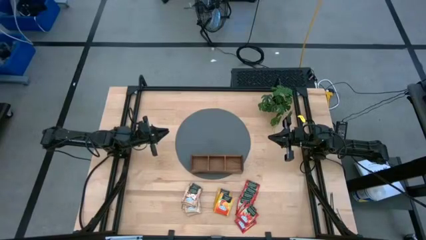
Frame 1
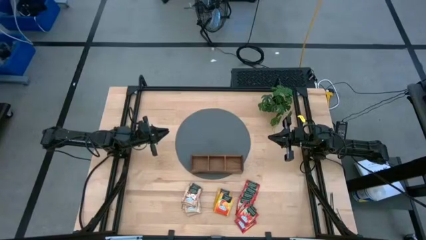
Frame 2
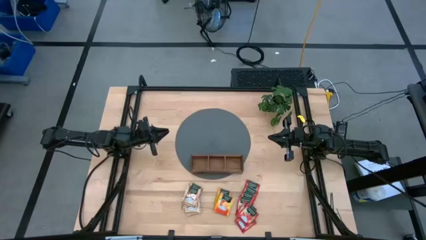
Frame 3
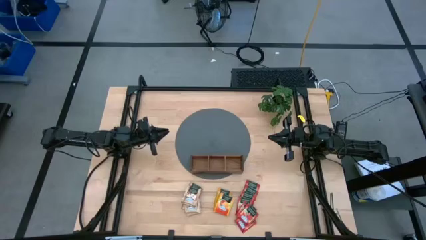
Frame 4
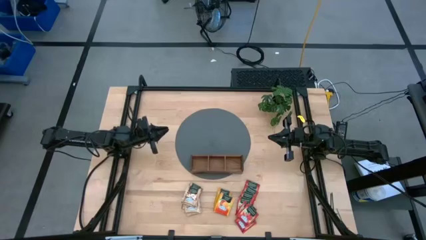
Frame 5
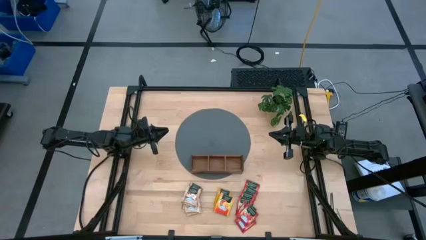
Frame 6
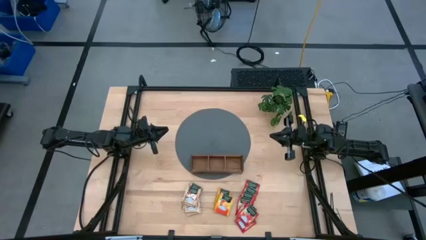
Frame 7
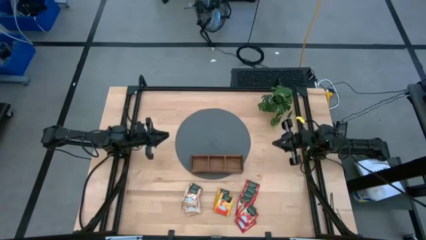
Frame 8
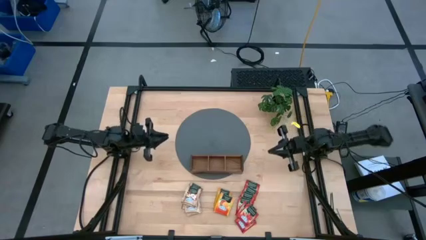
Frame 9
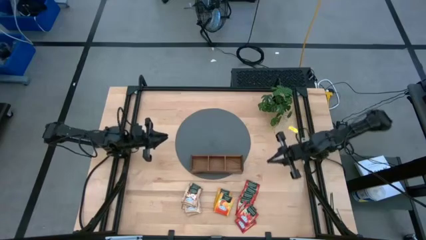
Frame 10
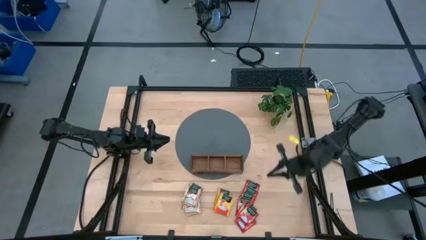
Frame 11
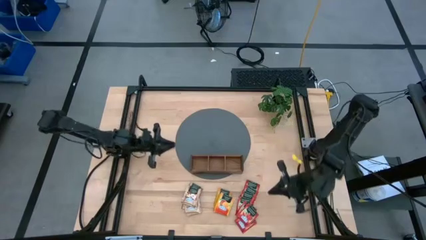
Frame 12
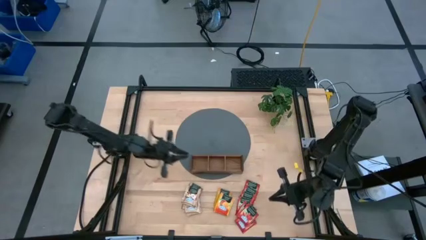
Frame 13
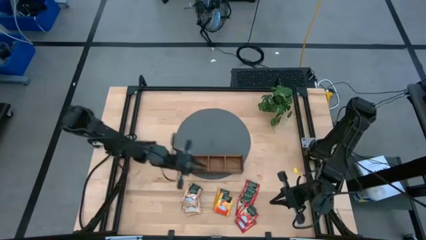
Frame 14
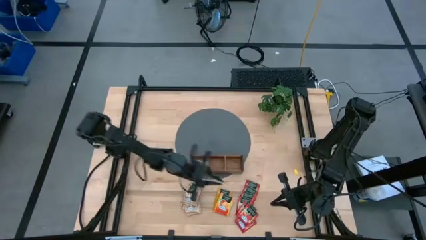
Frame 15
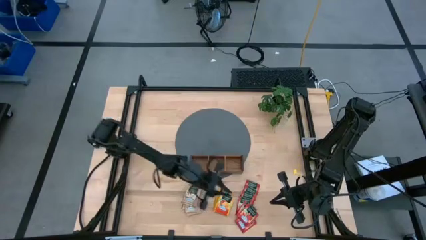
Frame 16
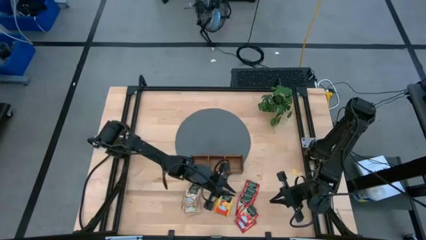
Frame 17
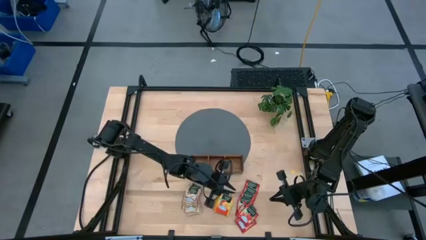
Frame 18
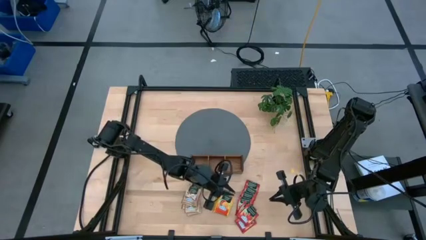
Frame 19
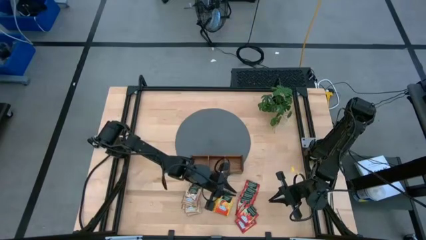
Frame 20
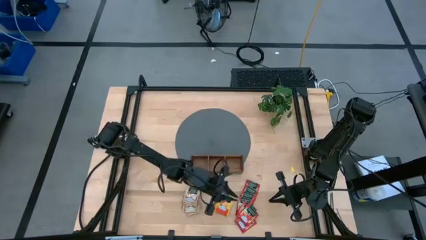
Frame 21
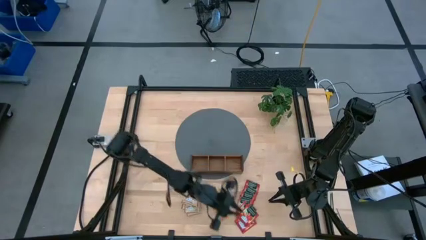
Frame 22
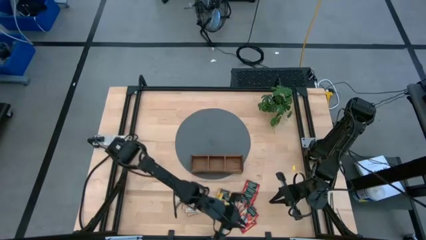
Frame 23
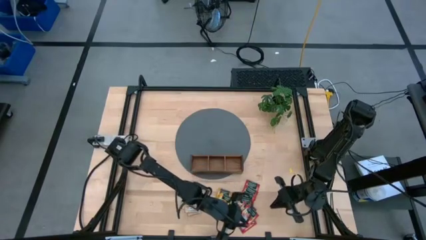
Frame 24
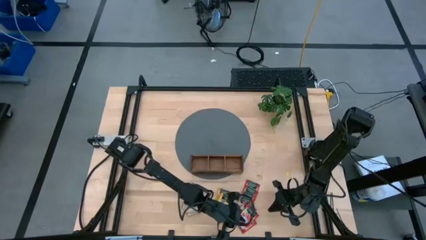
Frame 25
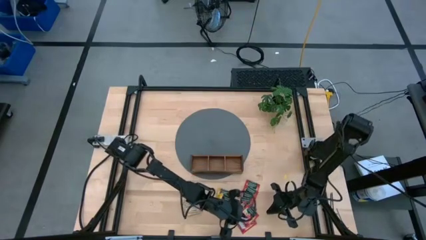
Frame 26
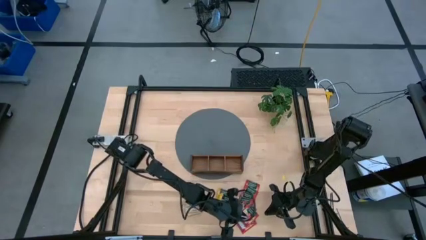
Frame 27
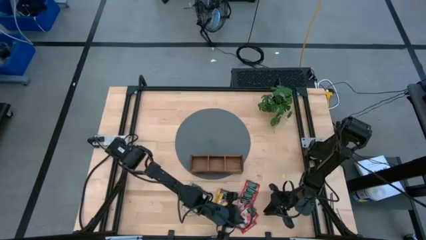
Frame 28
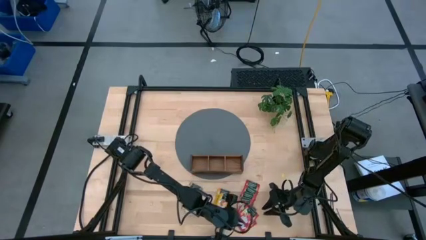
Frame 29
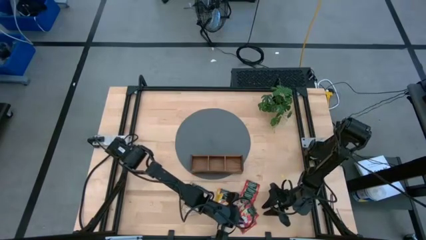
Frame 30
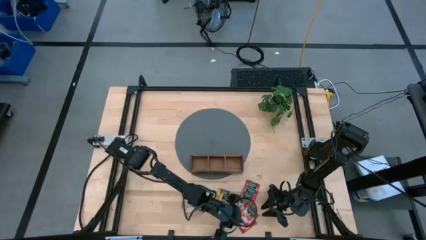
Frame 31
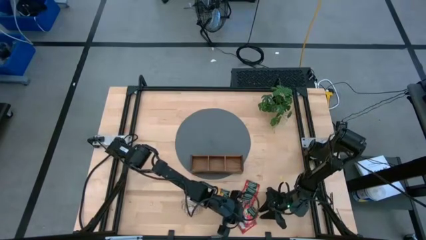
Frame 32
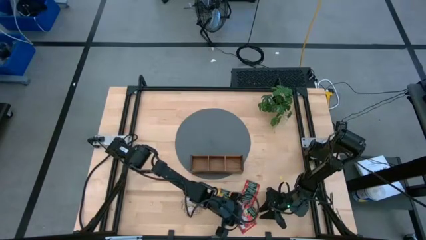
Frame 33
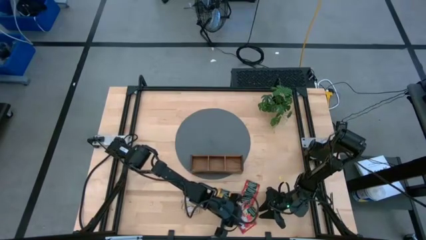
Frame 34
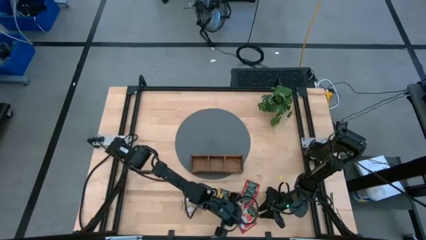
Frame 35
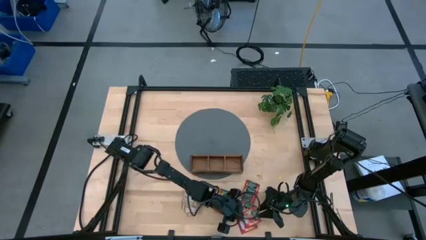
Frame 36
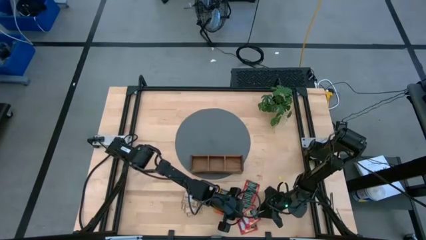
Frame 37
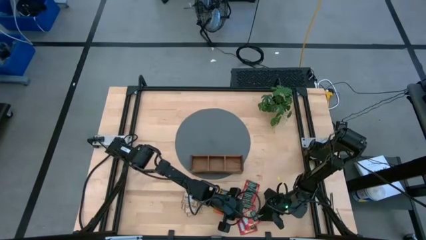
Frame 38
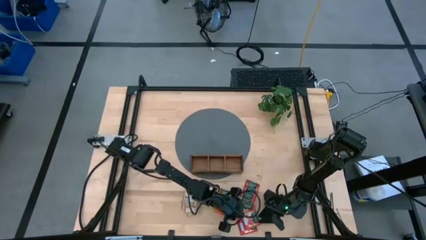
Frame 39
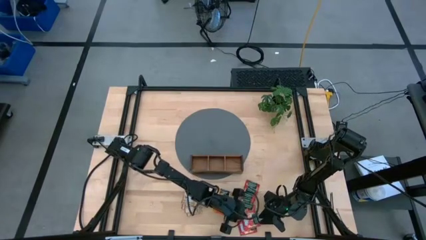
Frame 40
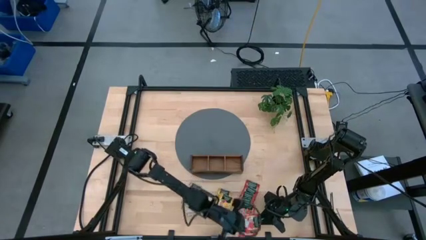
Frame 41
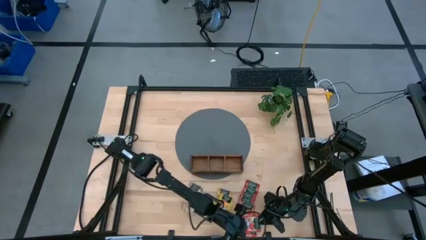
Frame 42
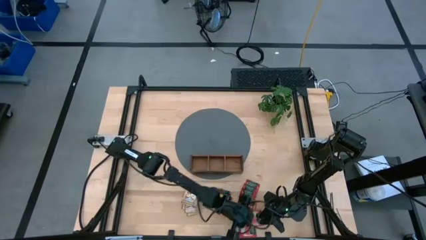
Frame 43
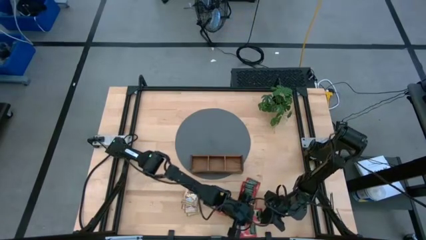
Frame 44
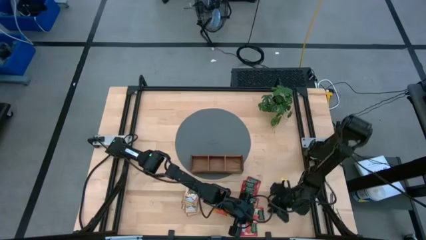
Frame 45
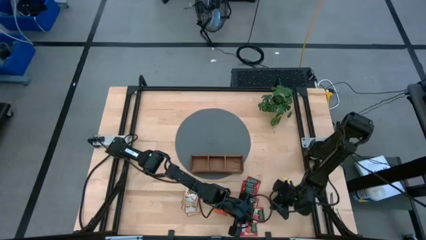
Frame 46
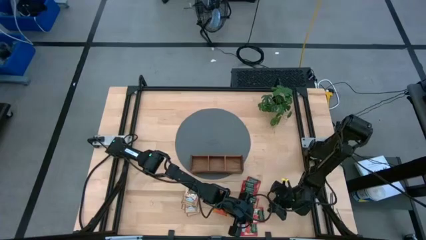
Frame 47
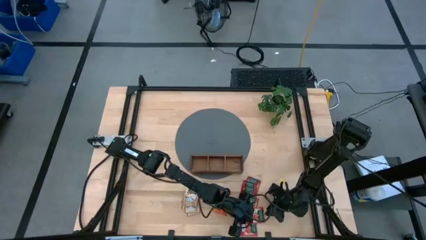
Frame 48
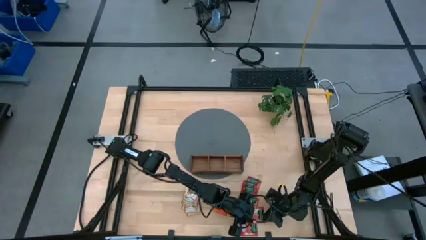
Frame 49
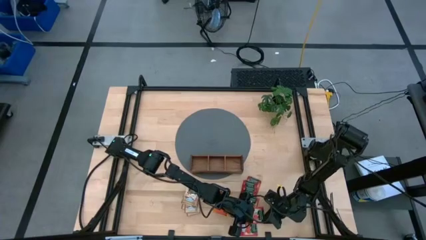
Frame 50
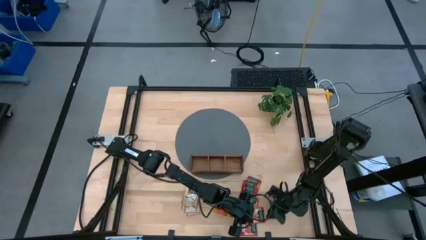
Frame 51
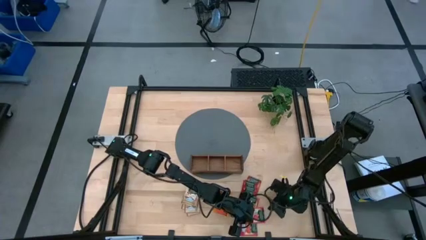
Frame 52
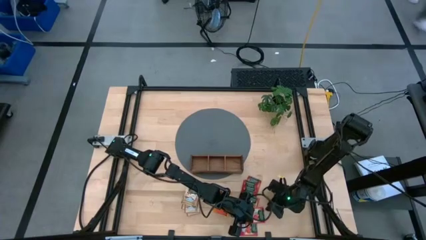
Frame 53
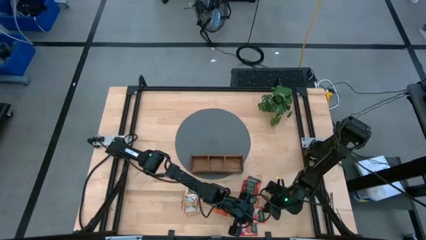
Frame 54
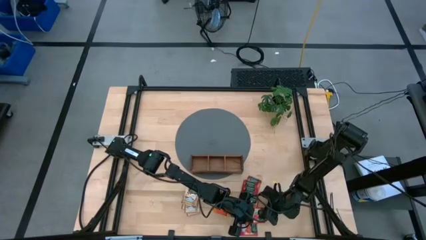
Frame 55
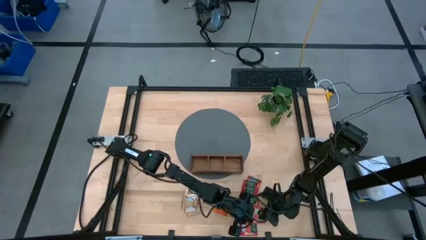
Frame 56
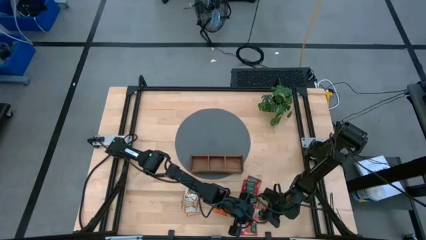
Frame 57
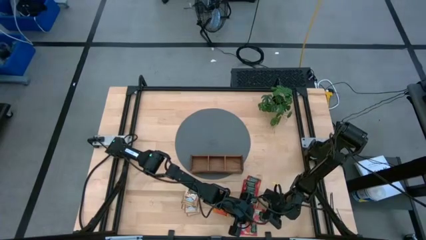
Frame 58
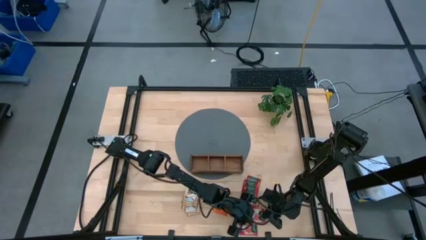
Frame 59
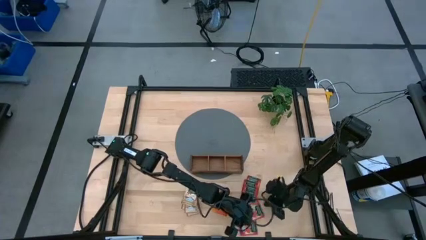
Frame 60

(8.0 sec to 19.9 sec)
Task: Pick & Place Tea
Put the red tea bag into the right section of the wooden organizer

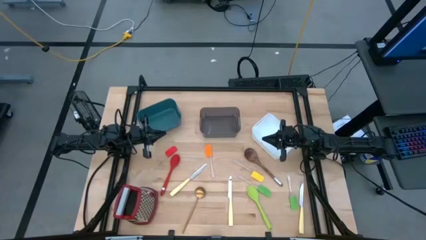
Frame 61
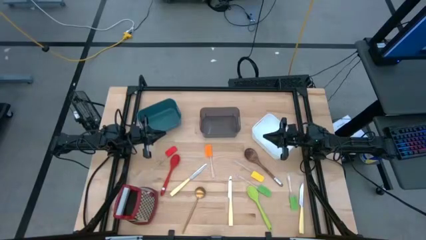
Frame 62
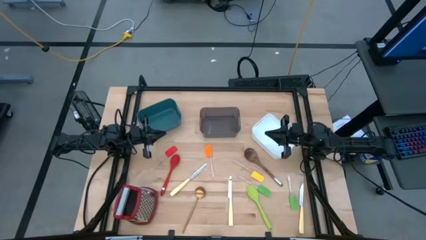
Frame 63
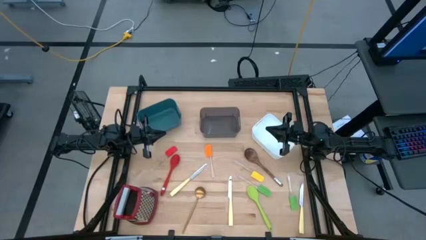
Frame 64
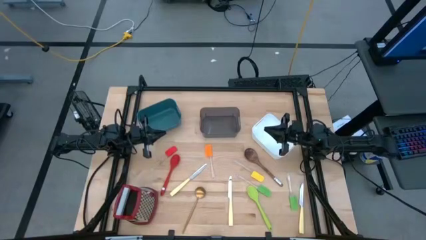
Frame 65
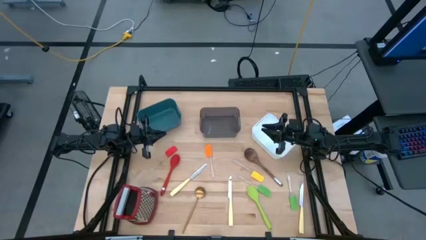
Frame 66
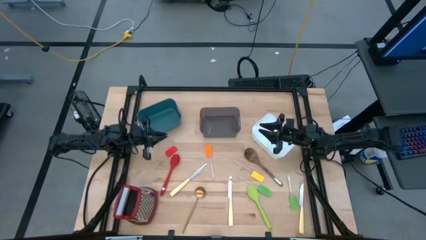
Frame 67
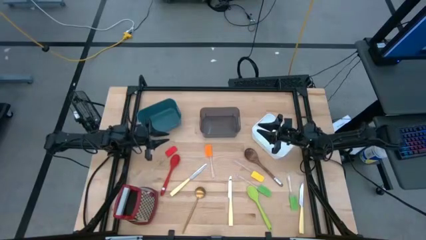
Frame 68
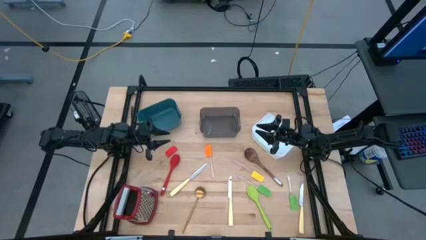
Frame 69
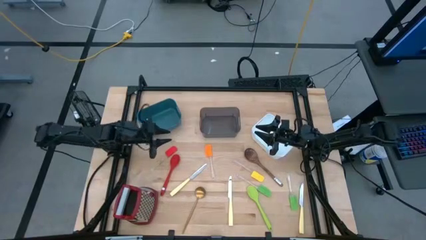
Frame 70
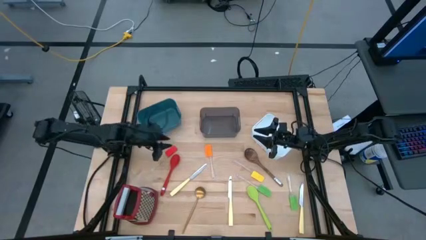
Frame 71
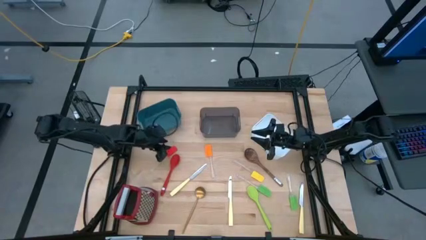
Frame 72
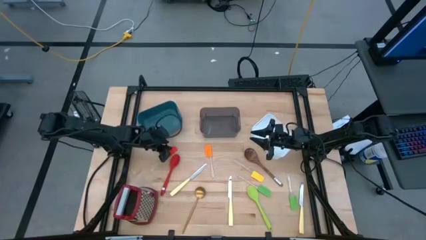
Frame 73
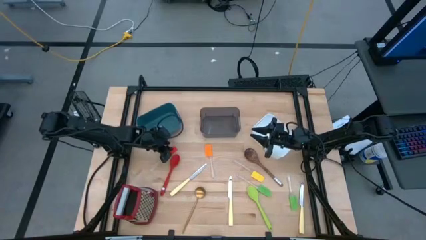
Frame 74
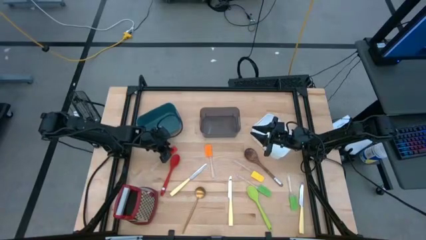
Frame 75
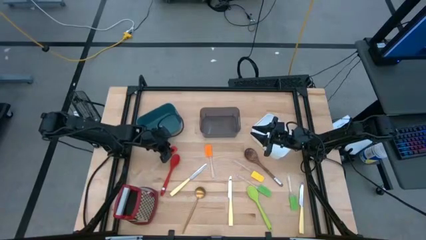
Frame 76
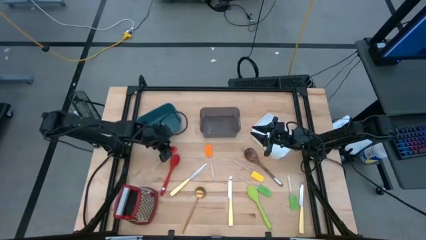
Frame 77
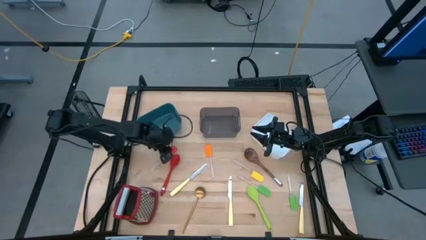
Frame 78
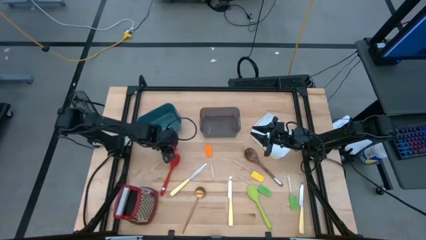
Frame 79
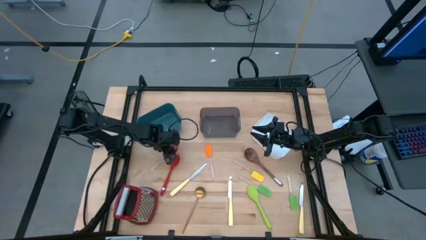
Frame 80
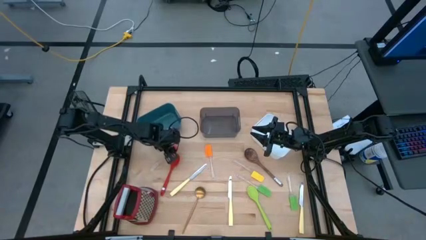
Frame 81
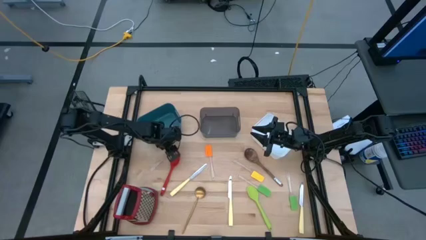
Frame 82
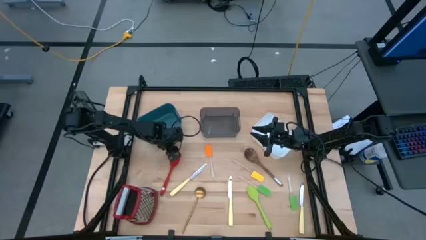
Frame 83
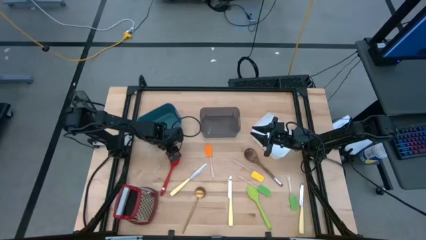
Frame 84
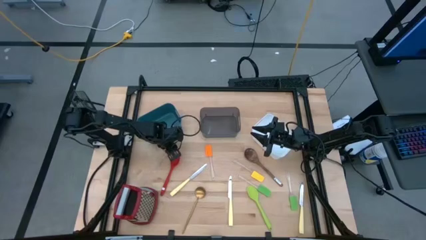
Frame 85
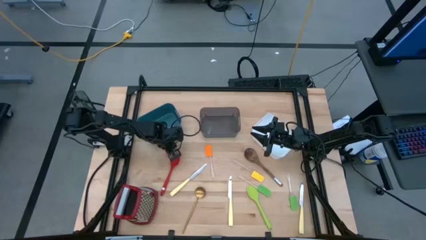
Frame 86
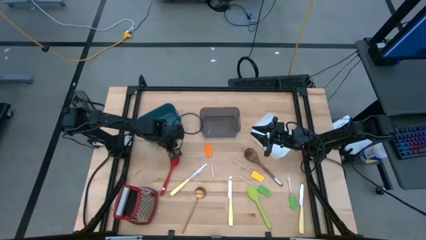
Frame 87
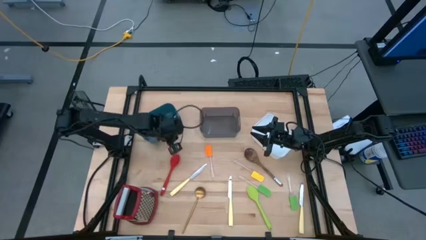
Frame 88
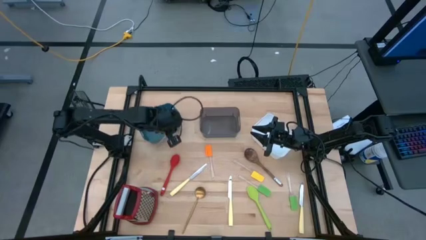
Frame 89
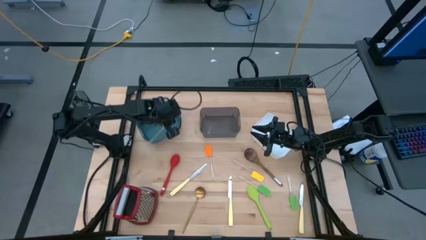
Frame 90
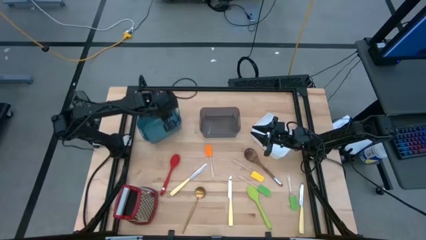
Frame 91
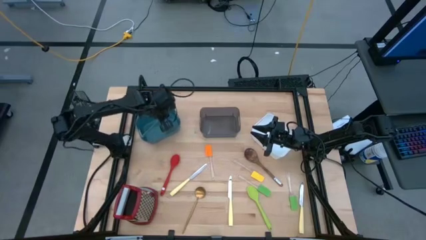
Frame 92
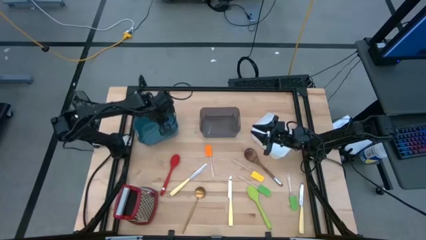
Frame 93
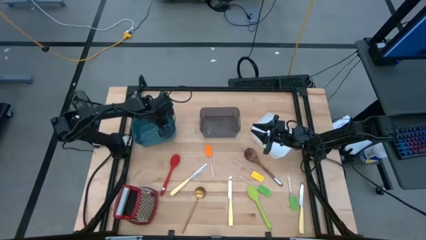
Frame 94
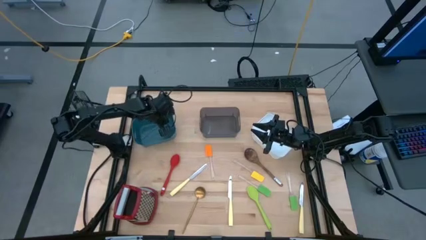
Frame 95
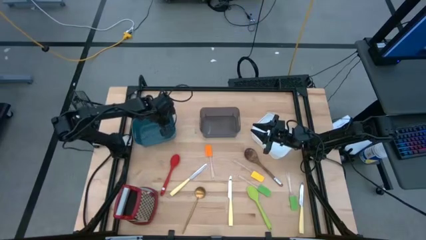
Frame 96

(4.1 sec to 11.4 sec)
Task: Pick & Place Kitchen Items
Put the red spatula into the blue bin
